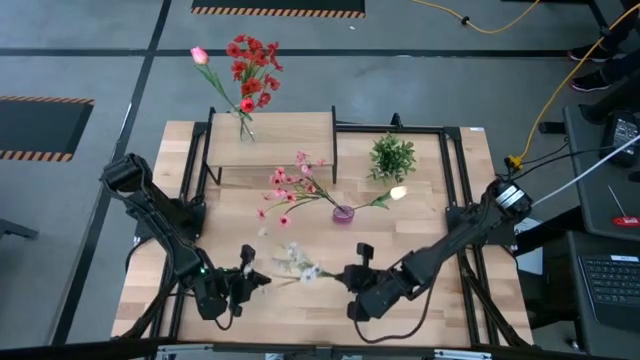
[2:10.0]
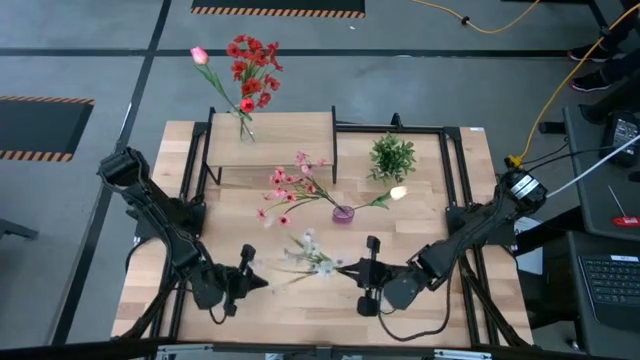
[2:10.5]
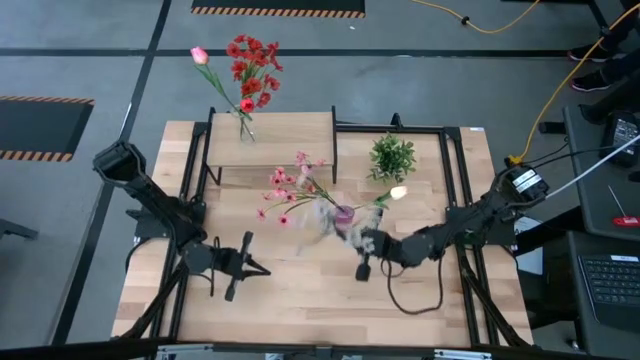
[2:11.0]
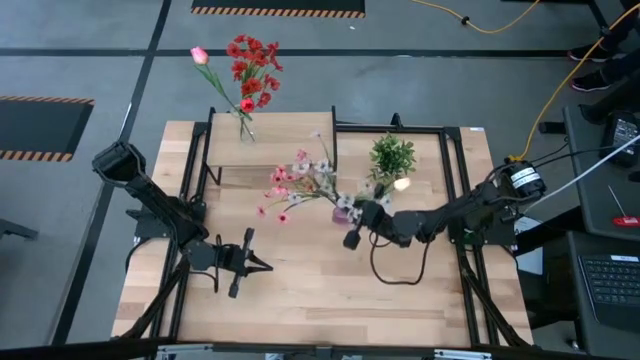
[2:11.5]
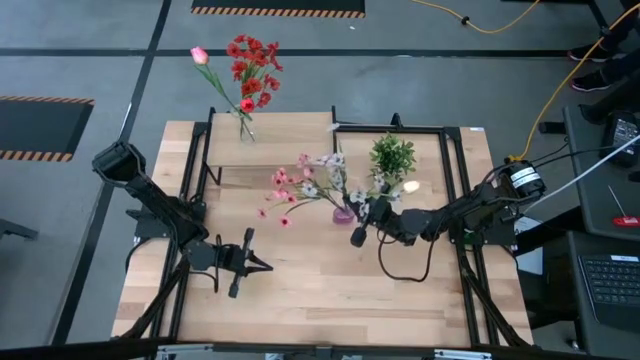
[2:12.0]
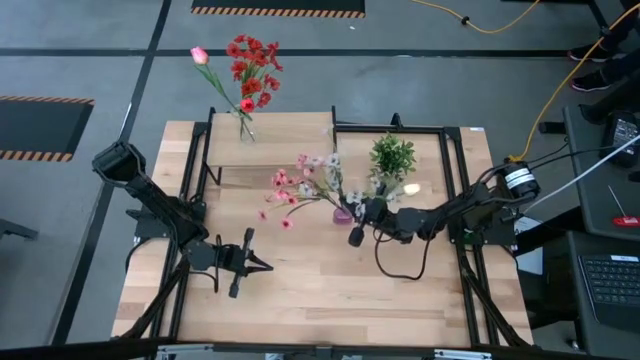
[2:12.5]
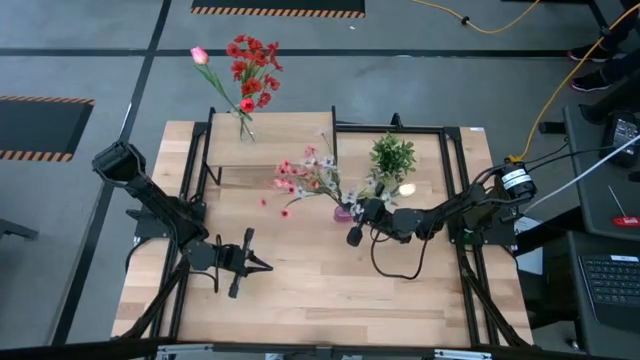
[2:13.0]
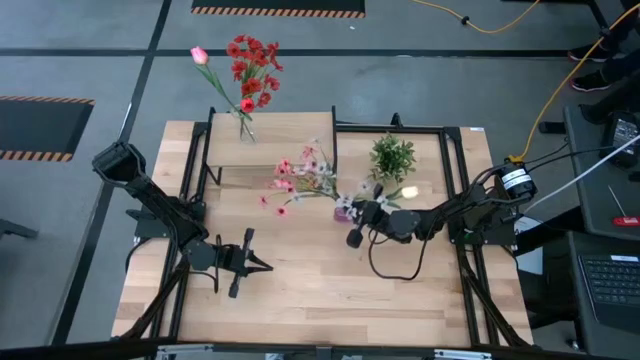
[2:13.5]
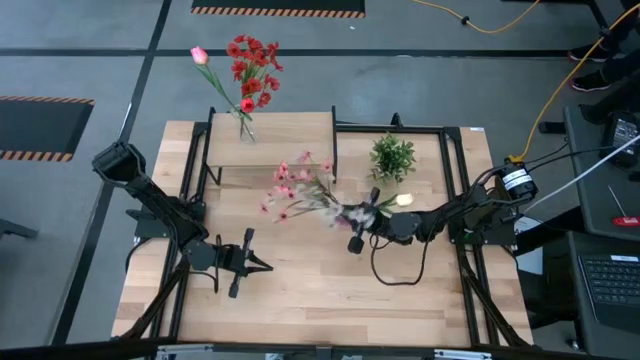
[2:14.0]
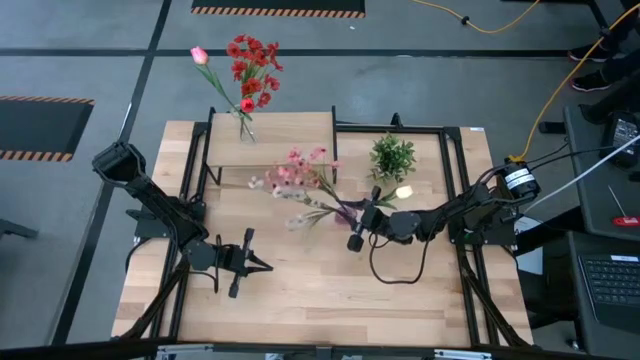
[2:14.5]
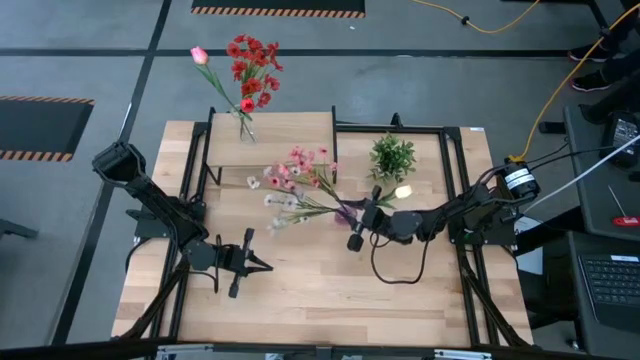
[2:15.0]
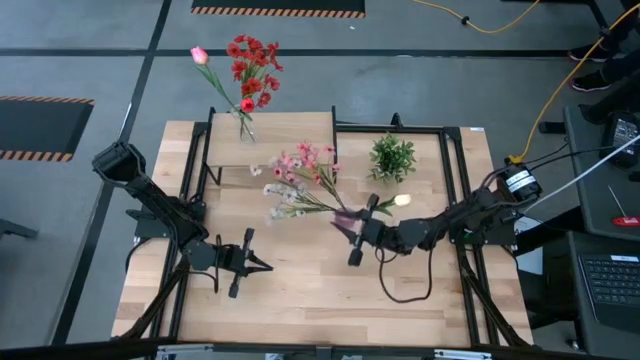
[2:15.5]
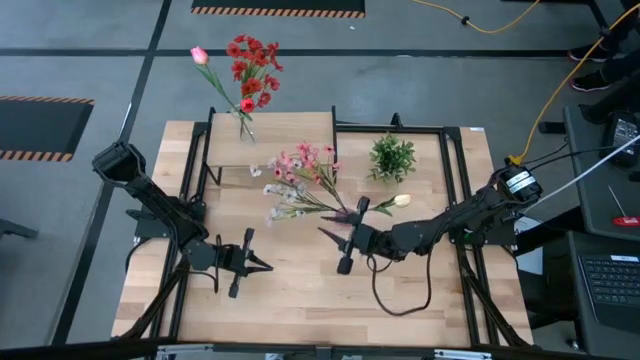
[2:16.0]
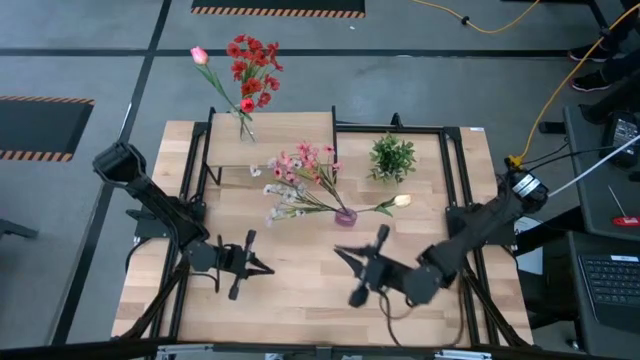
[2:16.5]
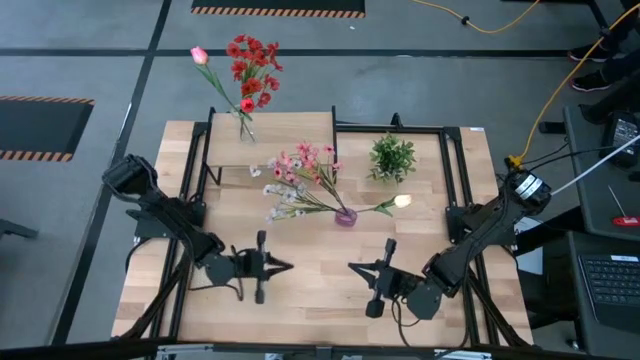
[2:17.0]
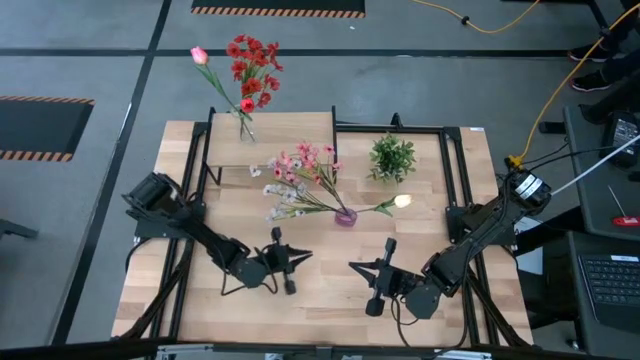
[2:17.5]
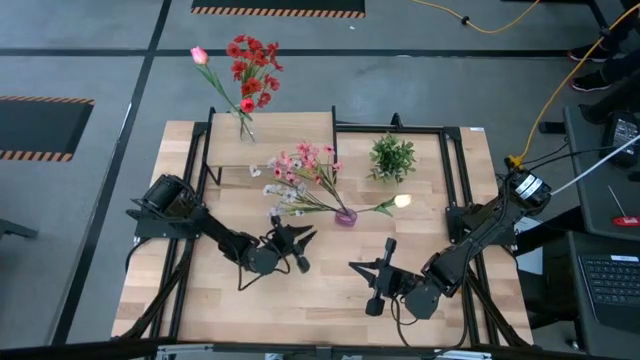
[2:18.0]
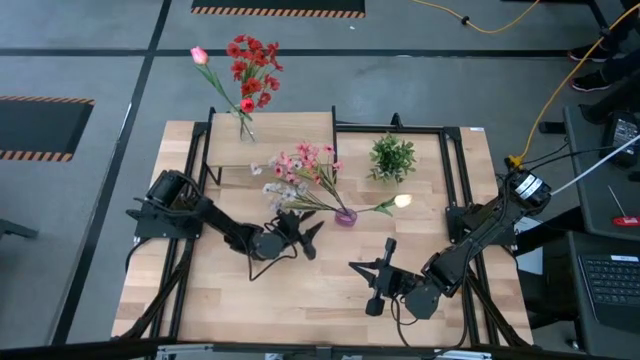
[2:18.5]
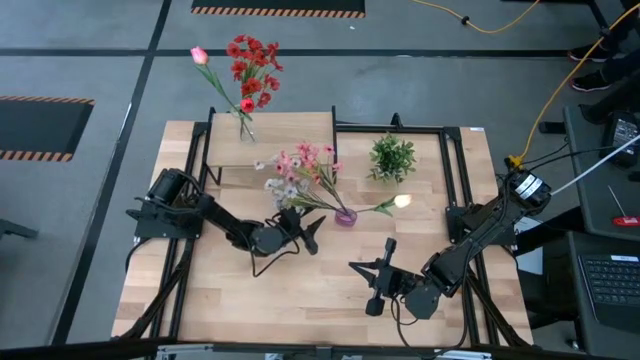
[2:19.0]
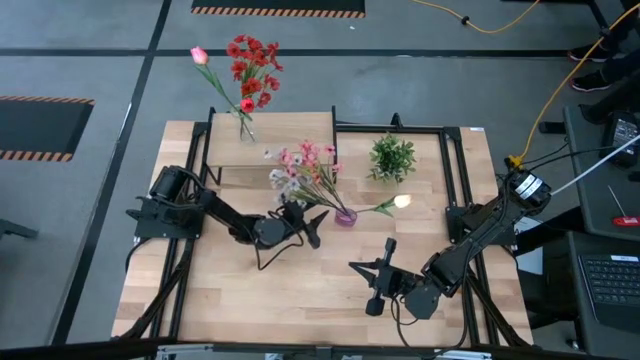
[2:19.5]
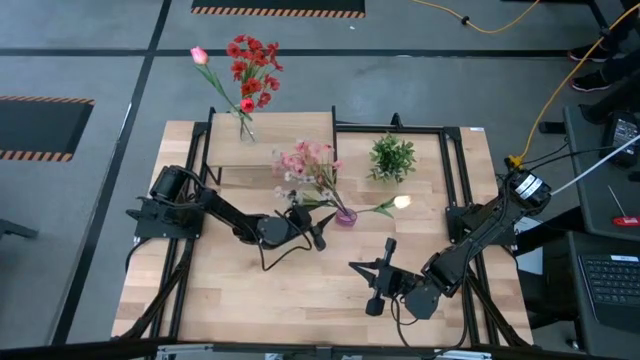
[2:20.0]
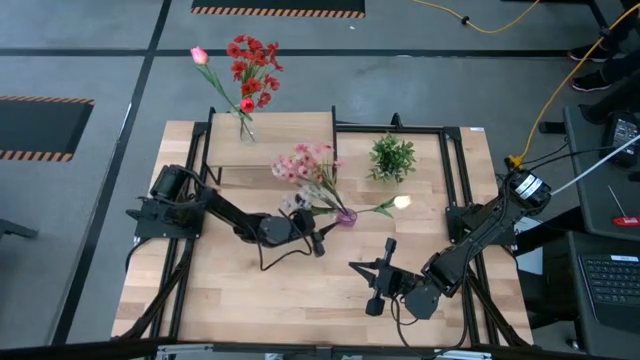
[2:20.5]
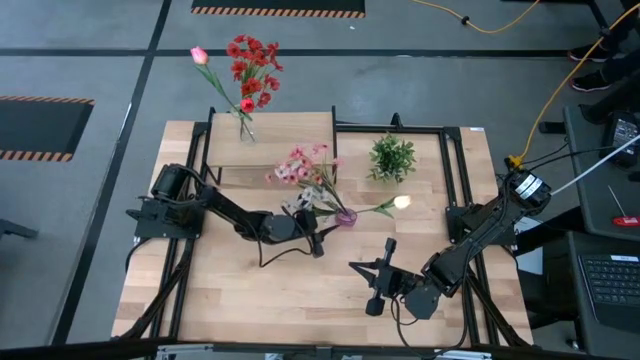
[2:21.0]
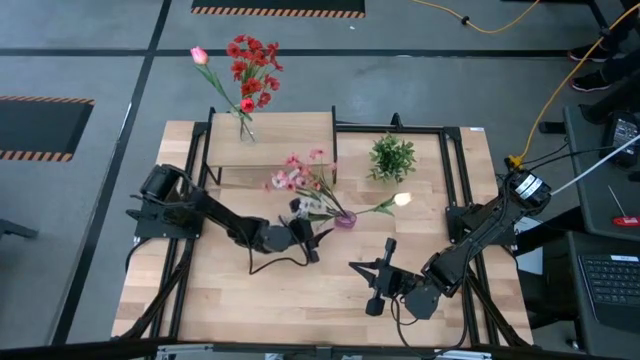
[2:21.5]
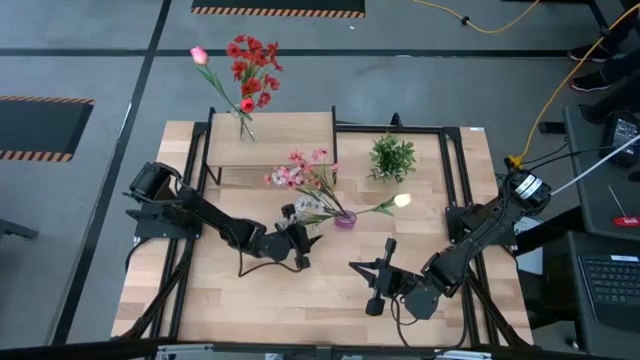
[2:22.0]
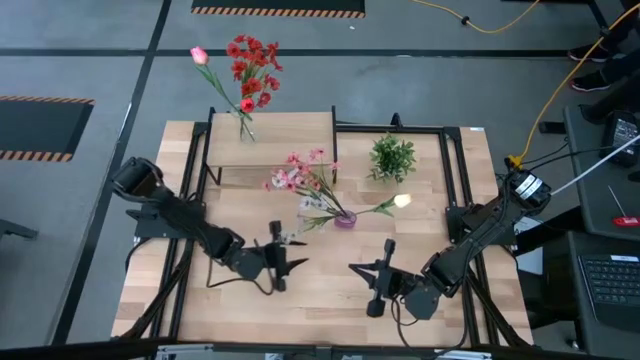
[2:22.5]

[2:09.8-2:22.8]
Task: Pick and place flowers into a vace then onto a shelf
Put the white flowers into the violet vase

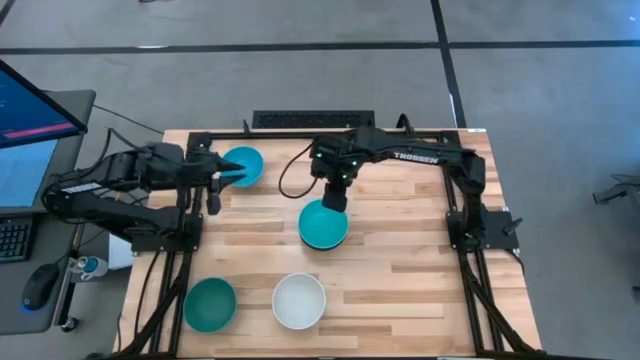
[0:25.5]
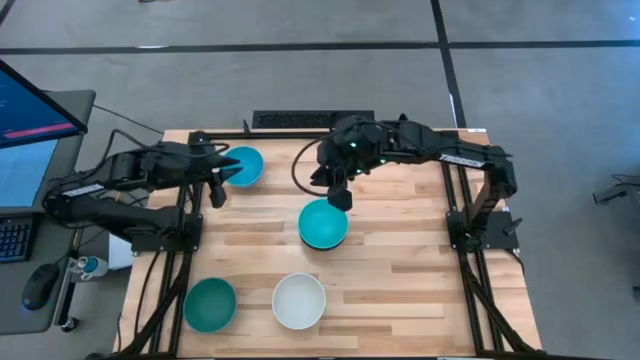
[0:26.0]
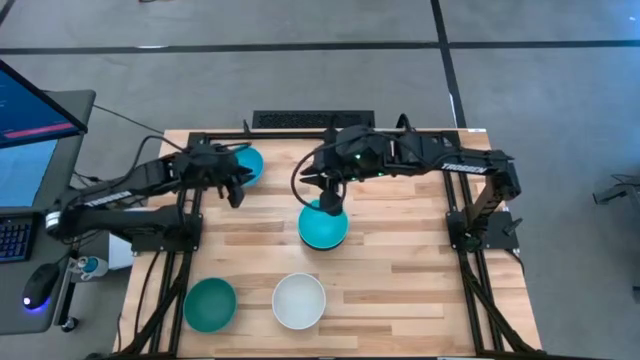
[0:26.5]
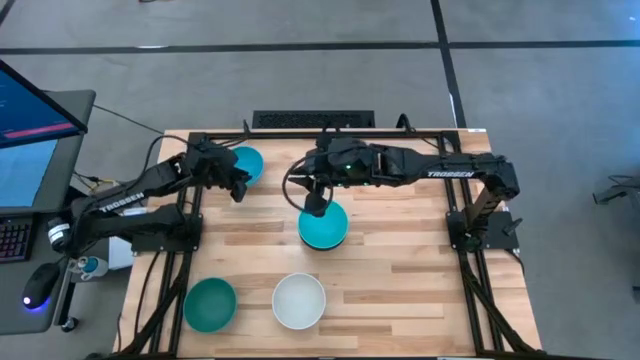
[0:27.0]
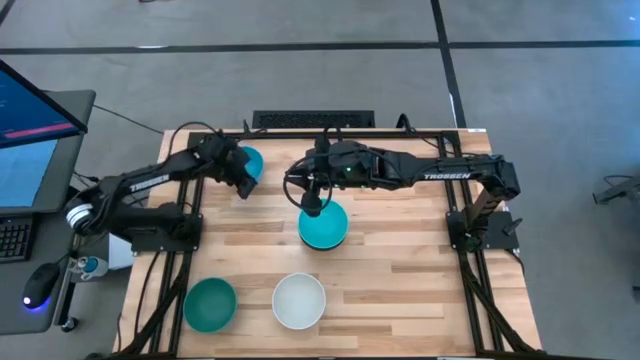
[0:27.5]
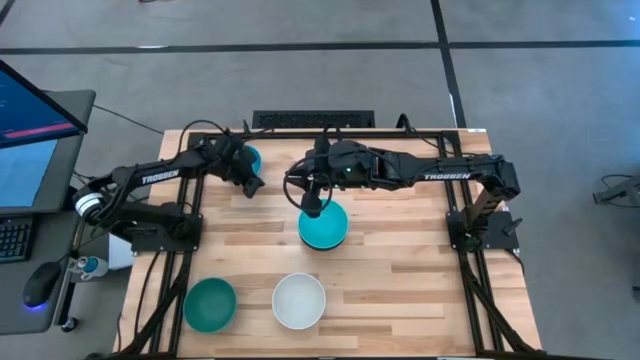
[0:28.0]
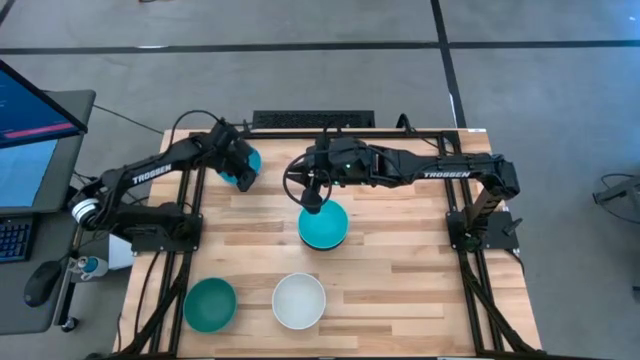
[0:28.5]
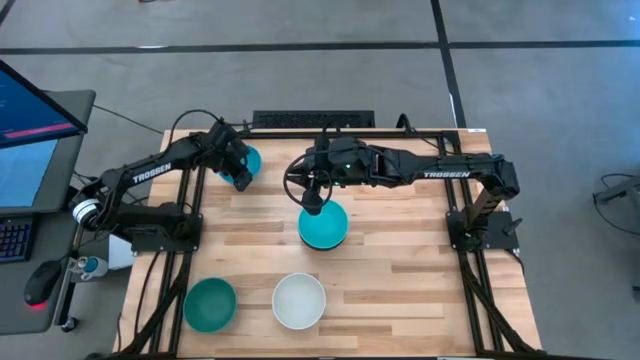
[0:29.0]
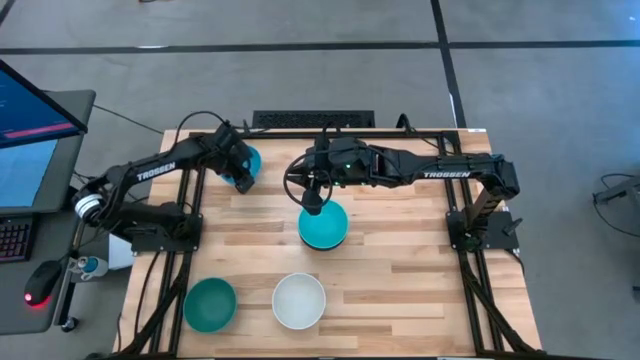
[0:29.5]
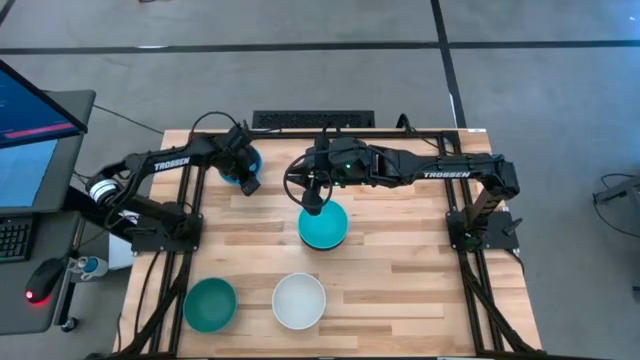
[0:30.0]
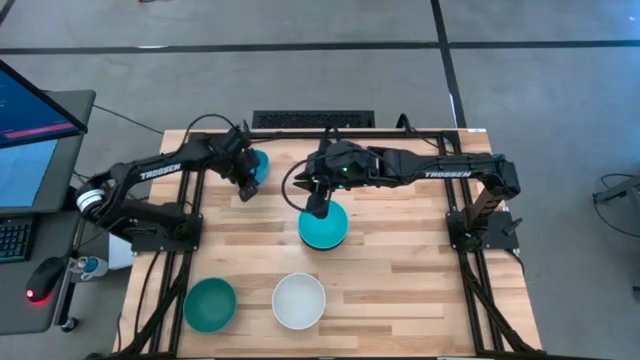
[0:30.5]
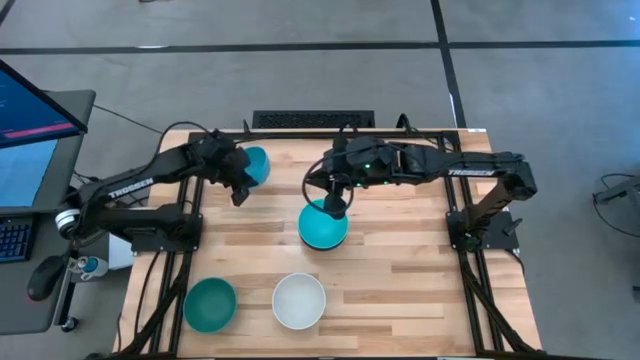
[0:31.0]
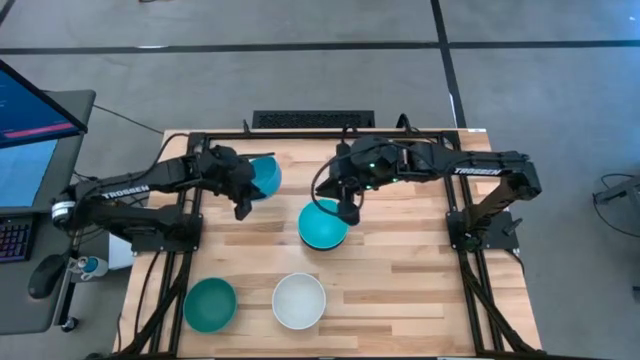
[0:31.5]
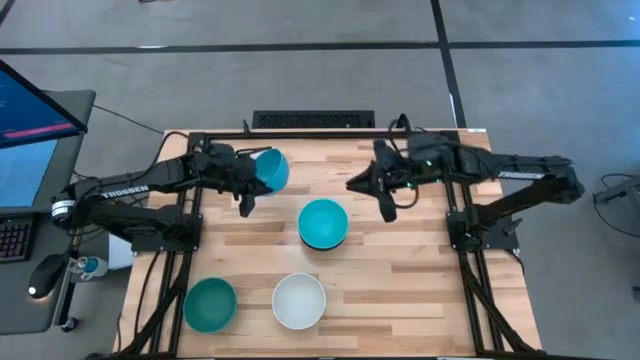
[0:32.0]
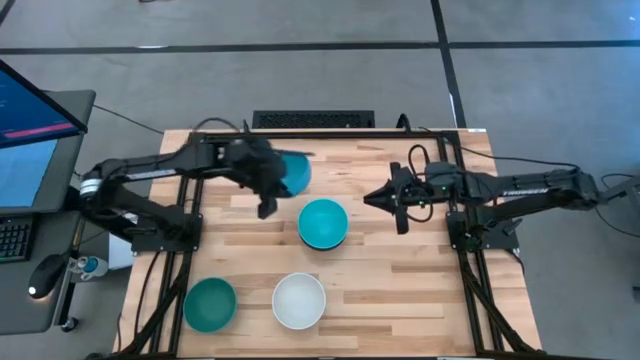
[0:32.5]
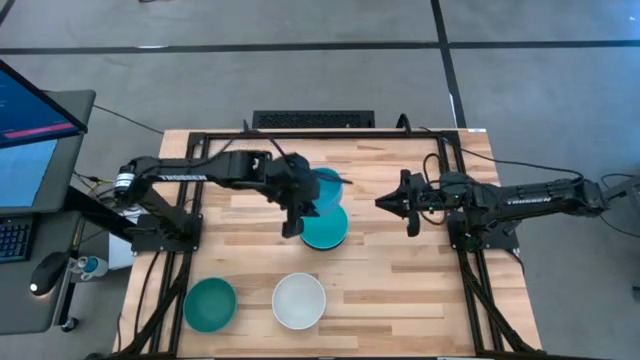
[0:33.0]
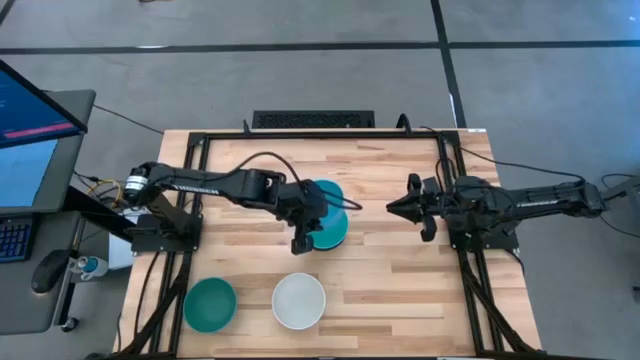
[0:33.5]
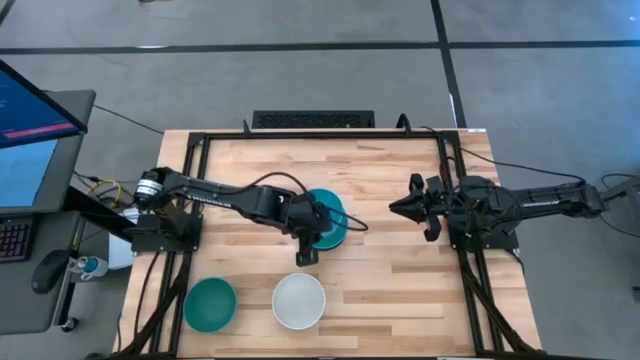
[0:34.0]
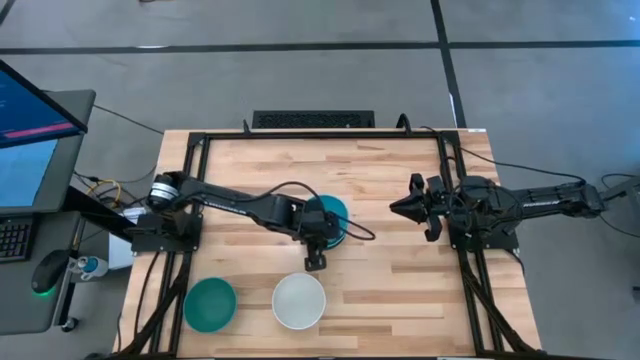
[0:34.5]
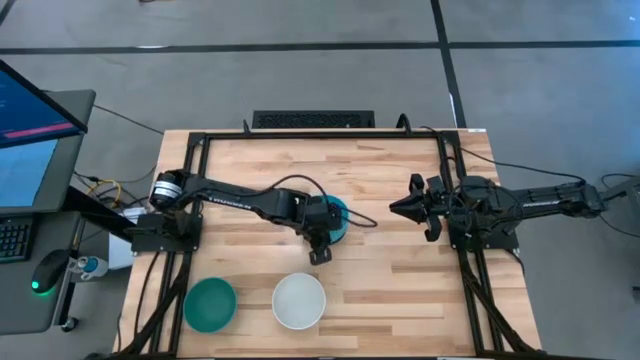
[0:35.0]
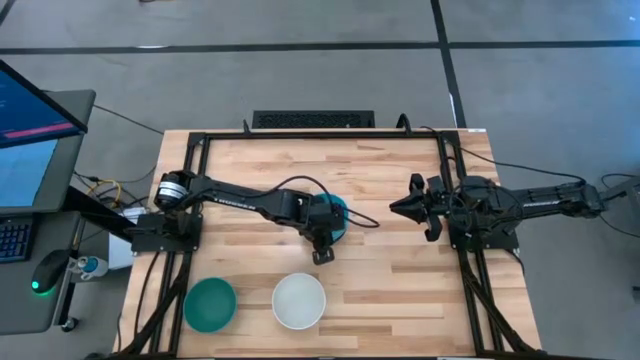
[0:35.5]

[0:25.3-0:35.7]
Task: Nest bowls inside each other
Stack the blue bowl on top of the light blue bowl
